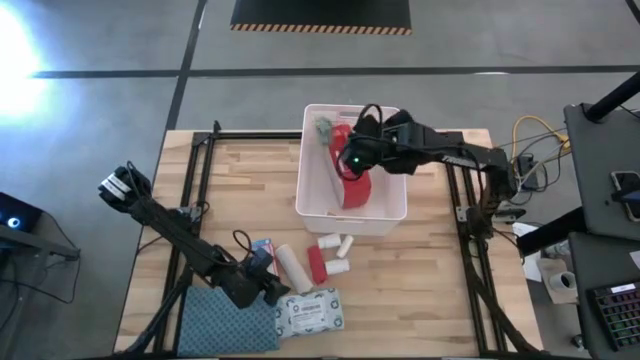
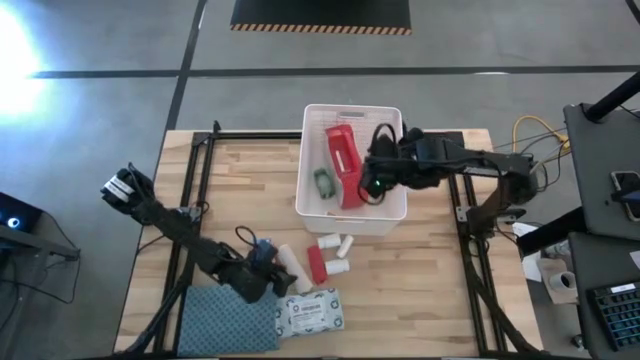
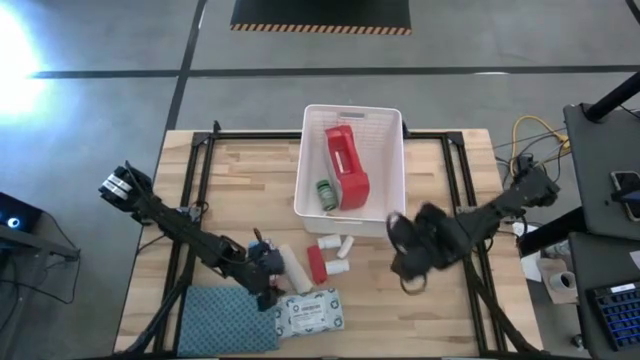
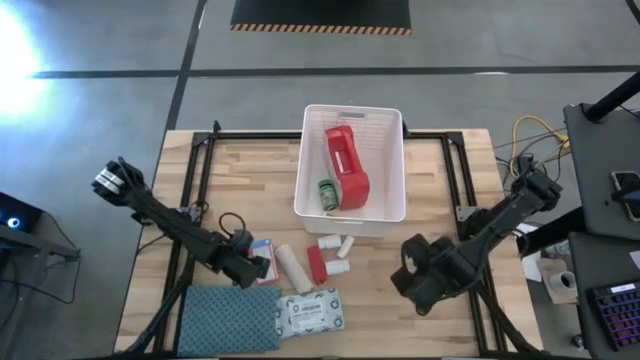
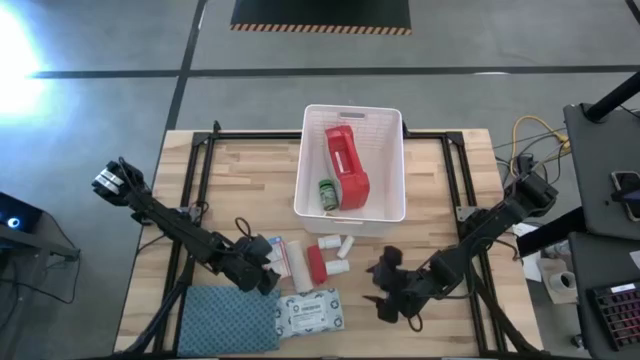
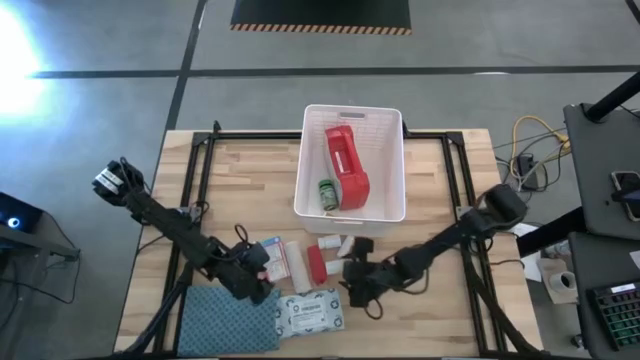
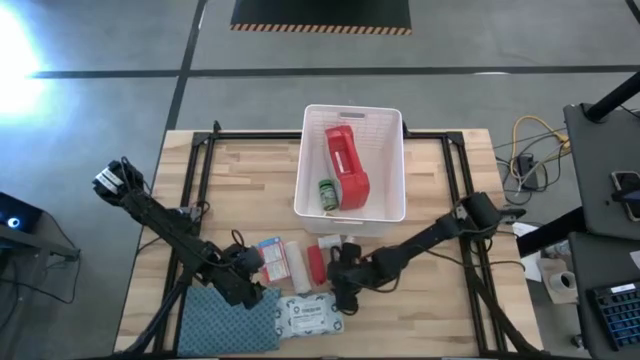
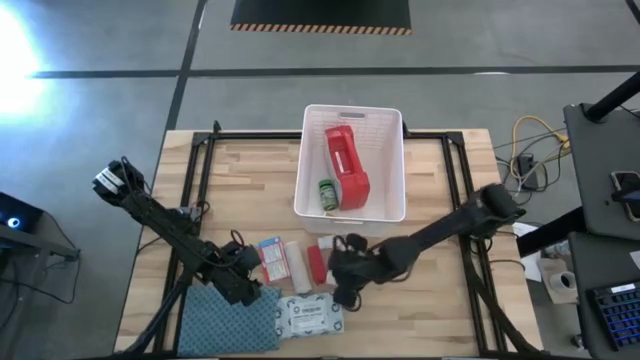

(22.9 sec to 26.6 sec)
Task: Pick & place medical supplies in basket/bin
Put the bottom white pill bottle into the white bin

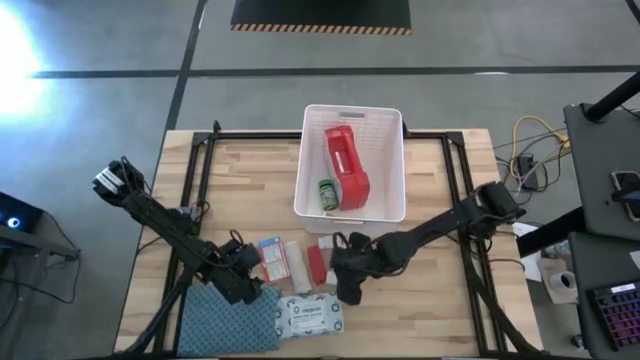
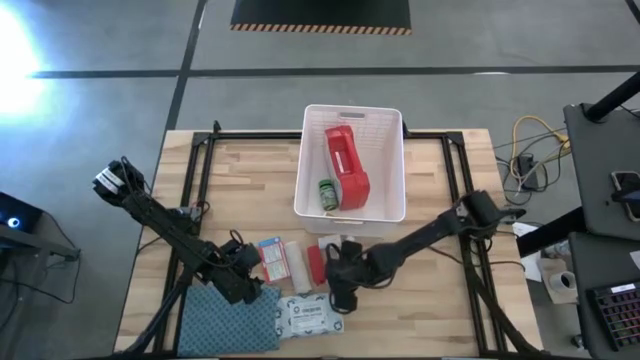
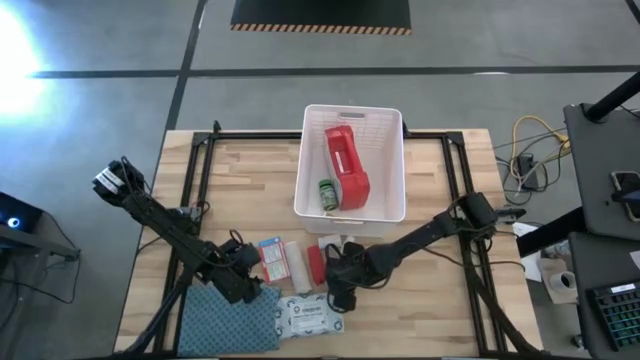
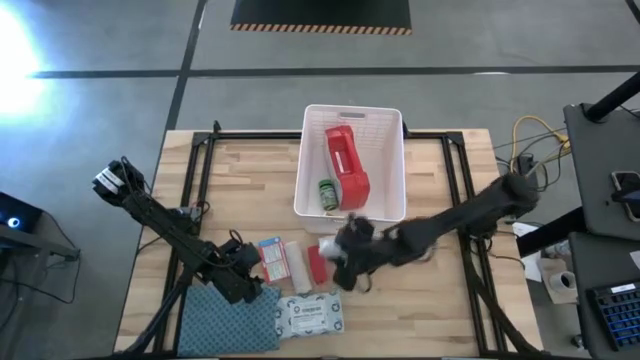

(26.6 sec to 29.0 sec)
Put the bottom white pill bottle into the white bin

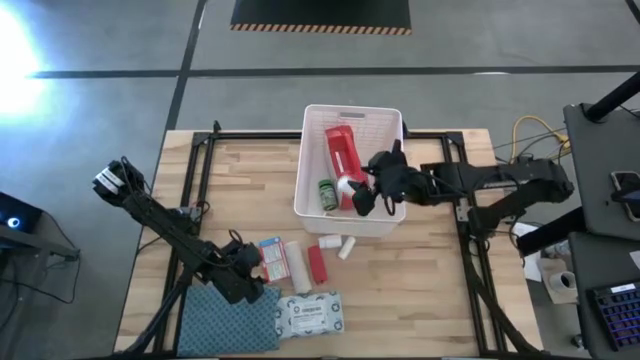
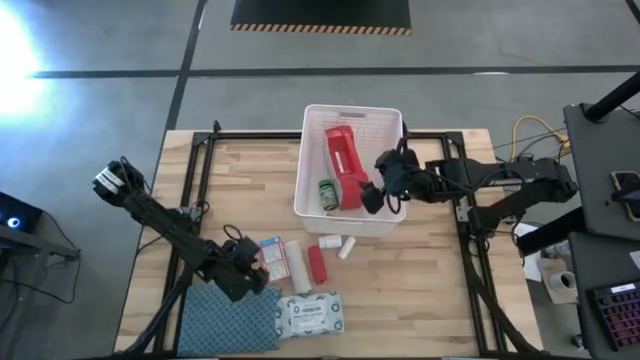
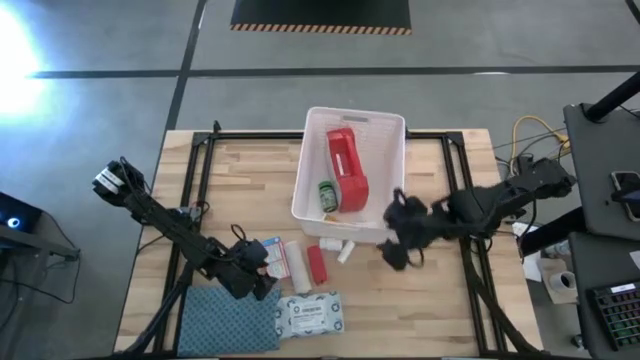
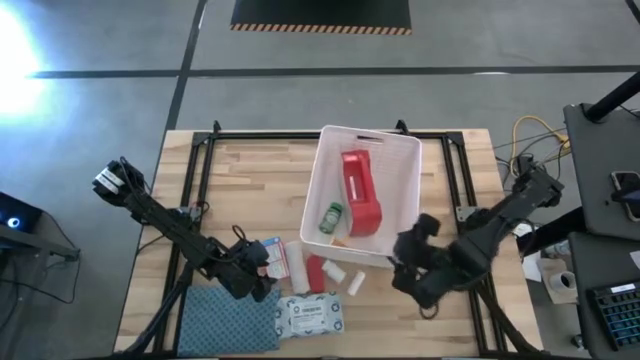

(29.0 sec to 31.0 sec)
Adjust the white bin

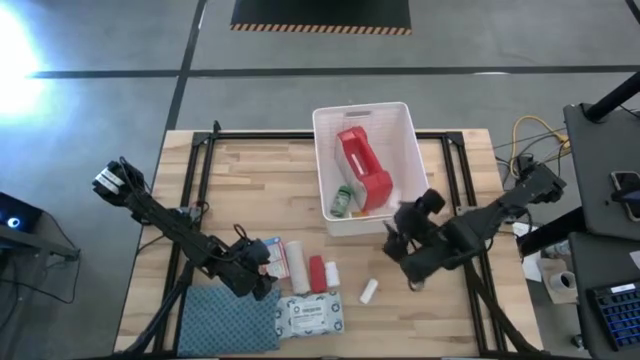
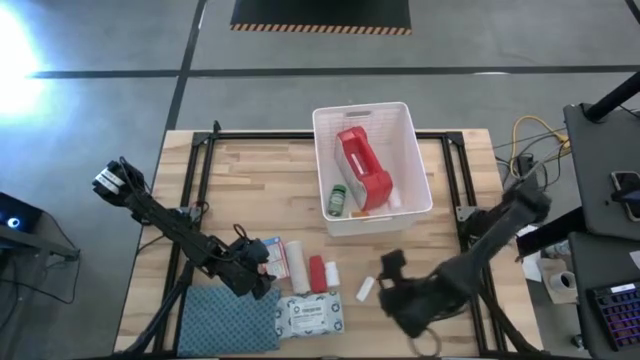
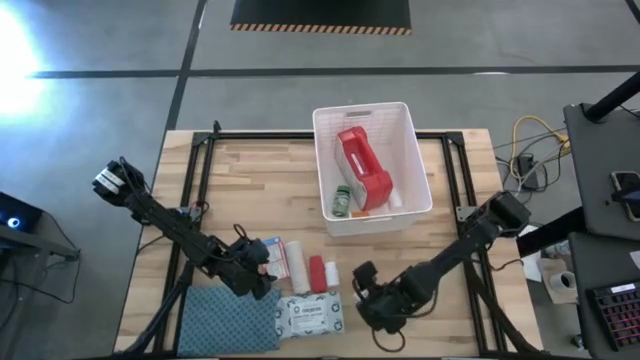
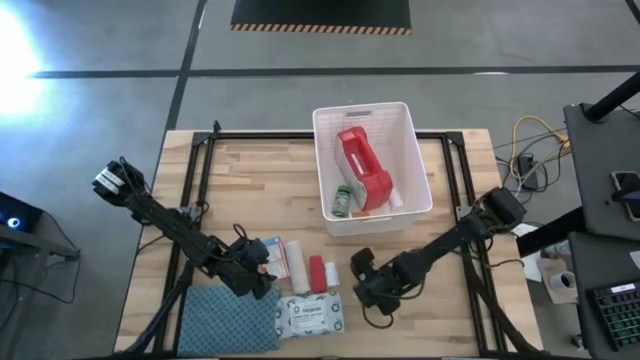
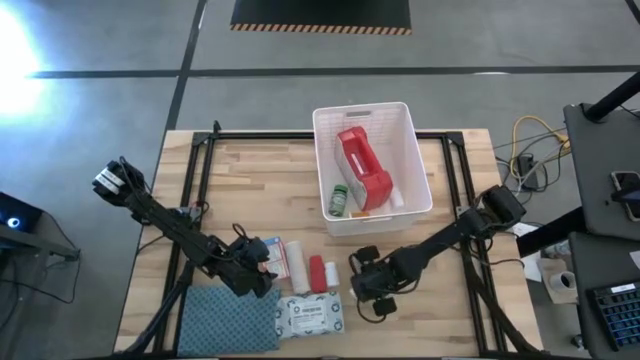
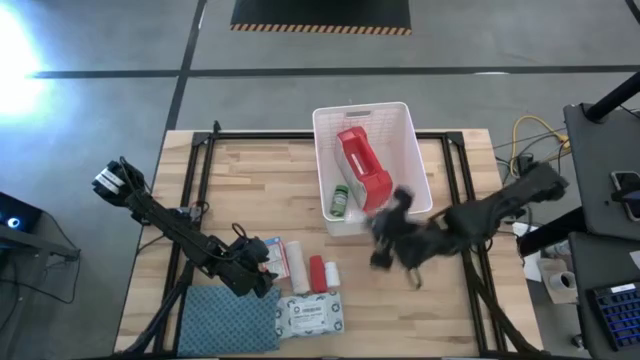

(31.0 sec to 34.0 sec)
Put the white gauze into the white bin

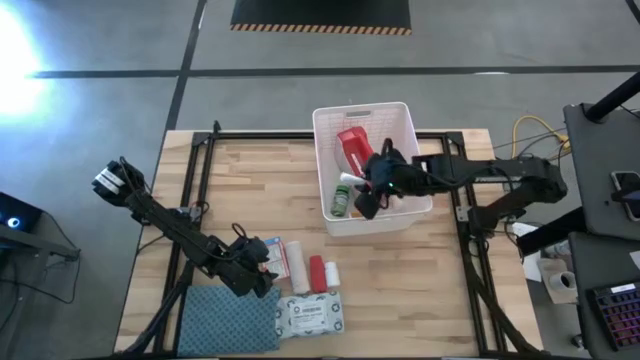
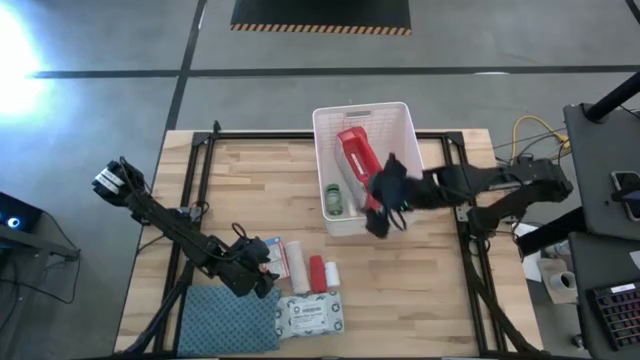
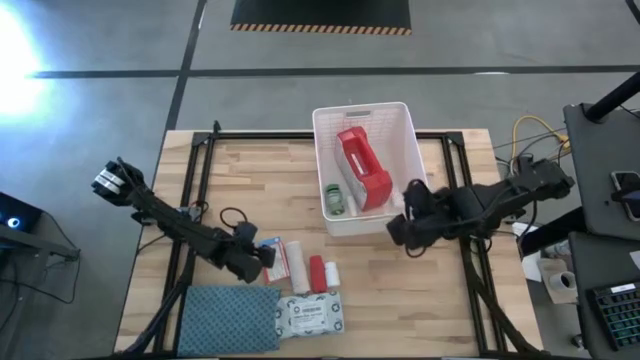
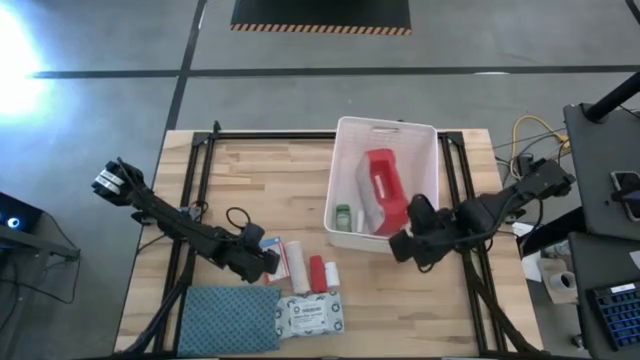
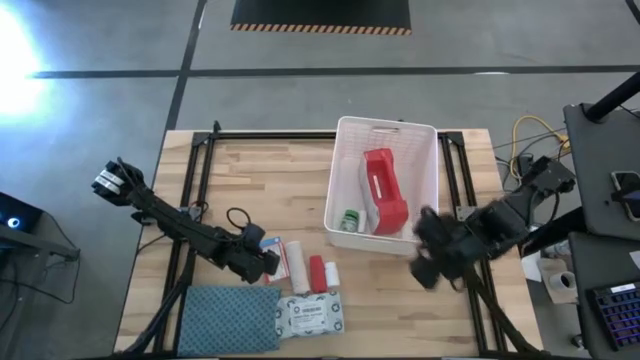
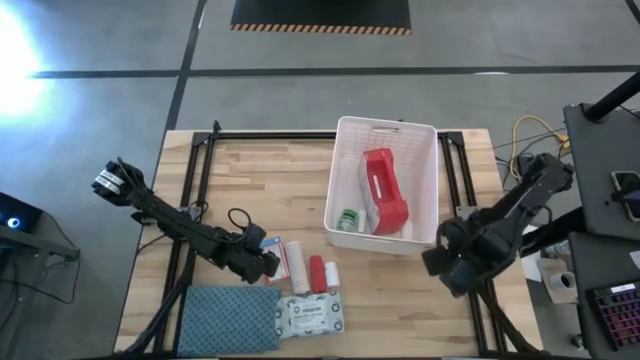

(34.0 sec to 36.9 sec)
Adjust the white bin

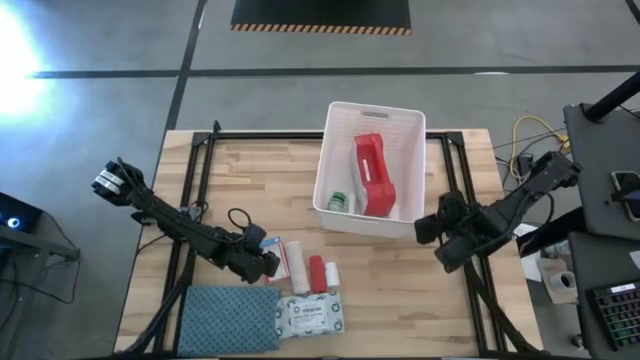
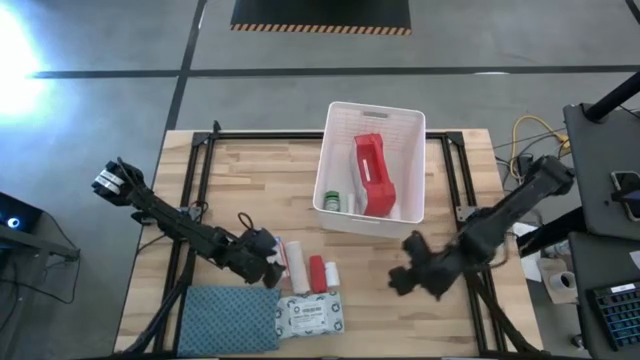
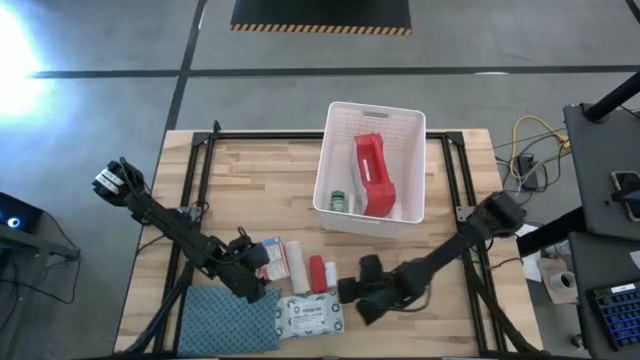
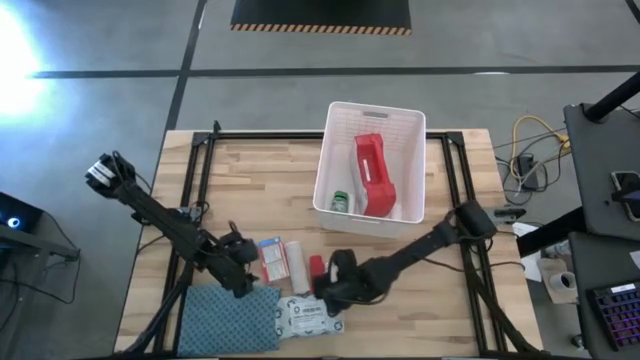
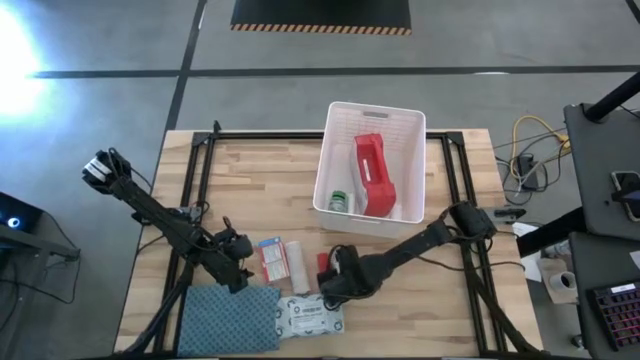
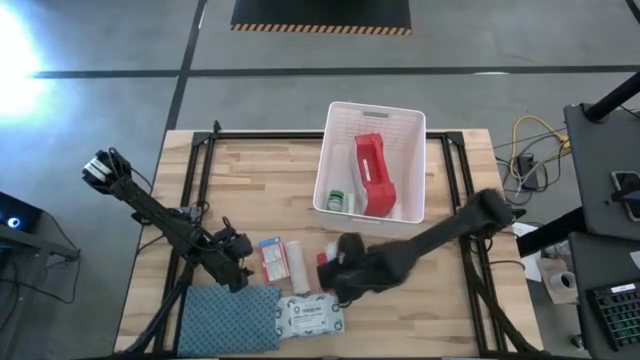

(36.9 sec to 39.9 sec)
Put the white pill bottle into the white bin

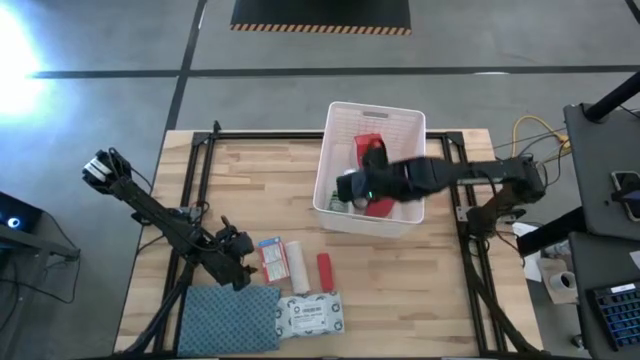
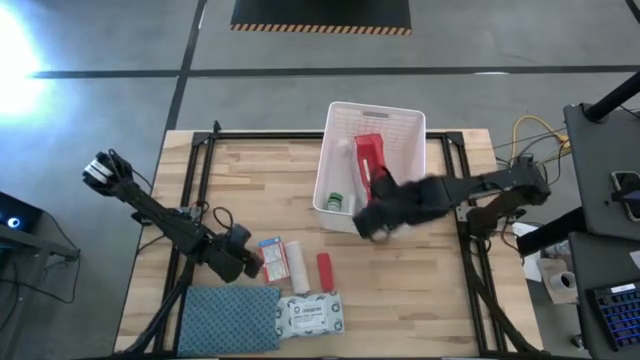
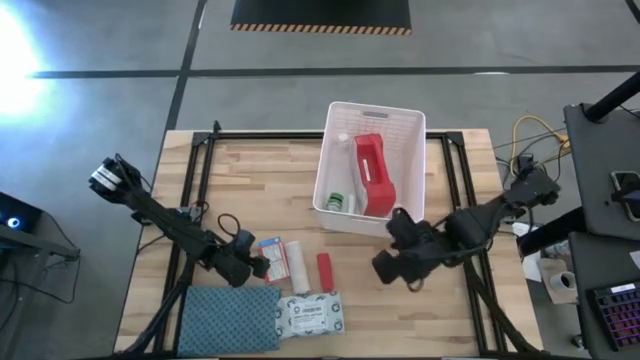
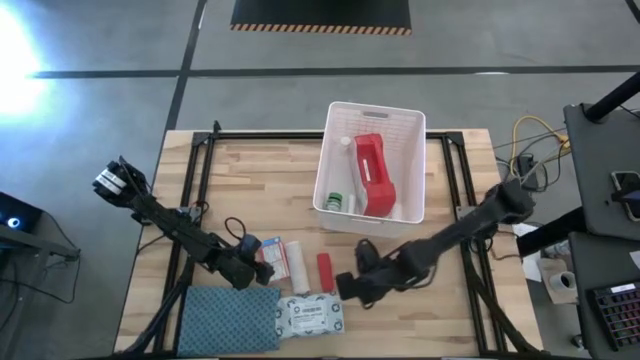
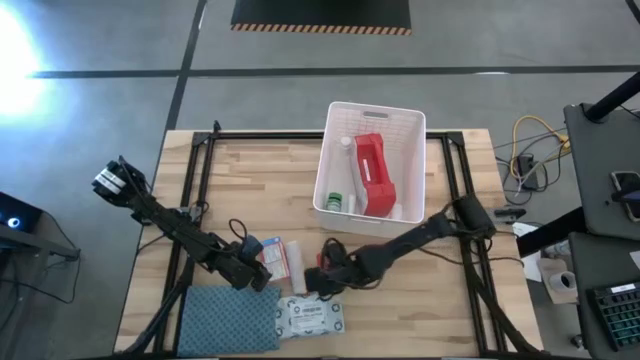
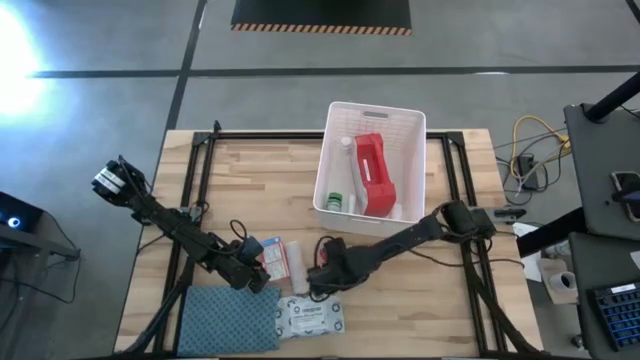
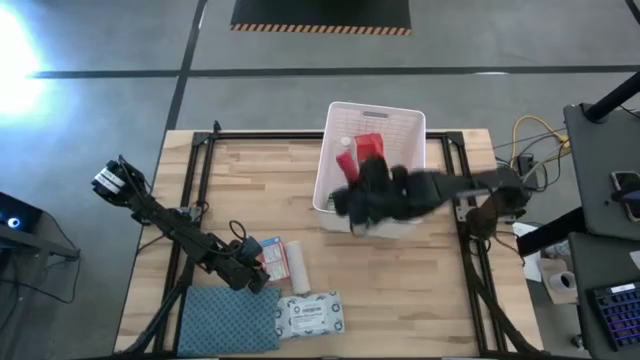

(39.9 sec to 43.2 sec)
Put the red bandage into the white bin

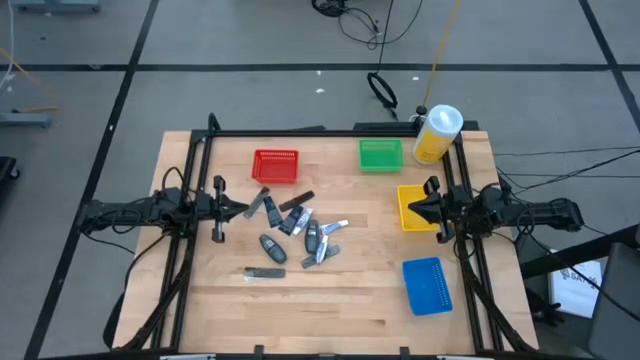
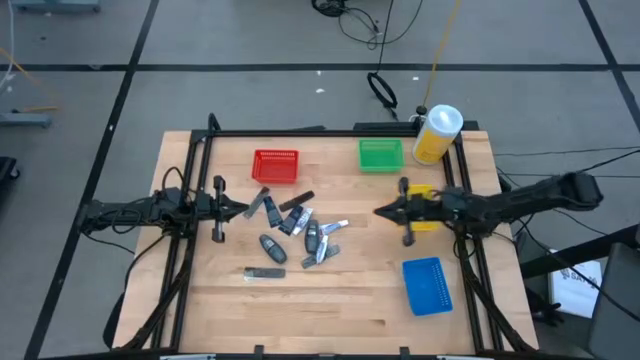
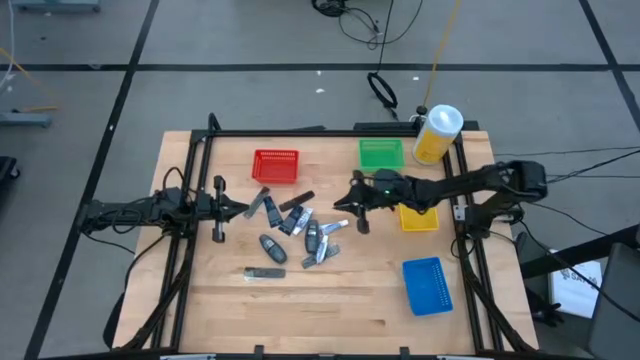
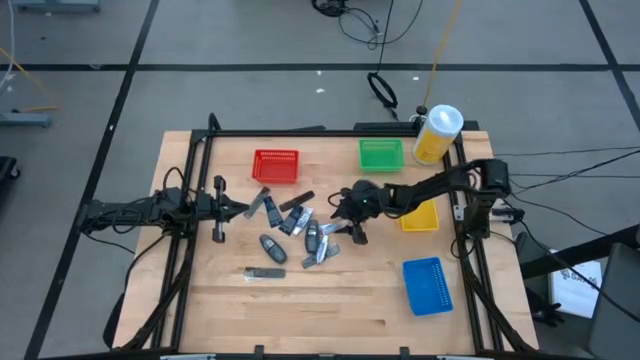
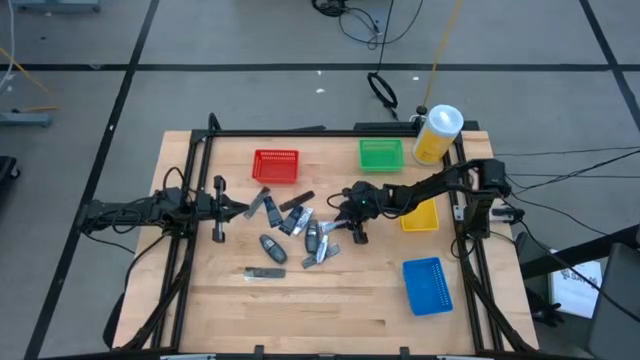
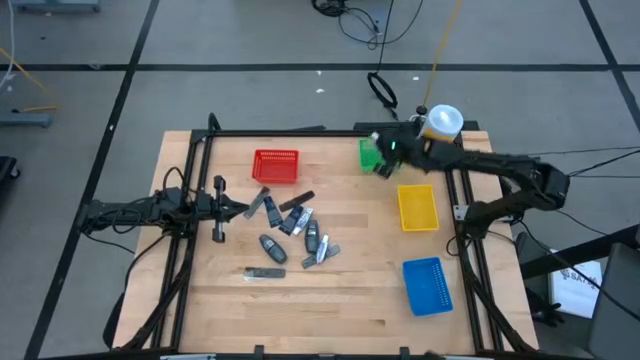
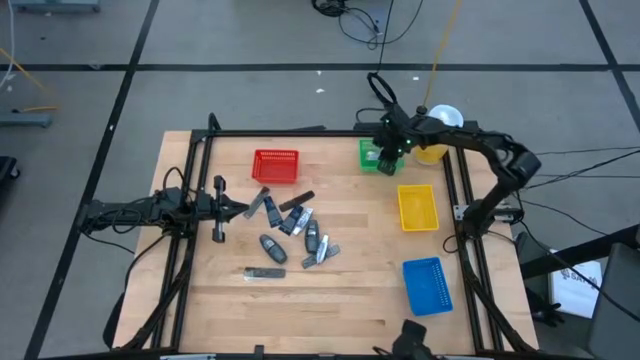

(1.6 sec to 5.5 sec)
Task: Pick & Place Travel size toiletries
Put the white toothpaste into the green bin
